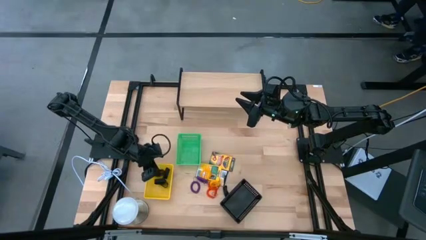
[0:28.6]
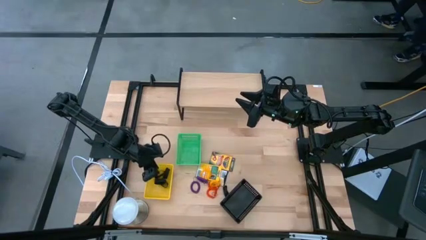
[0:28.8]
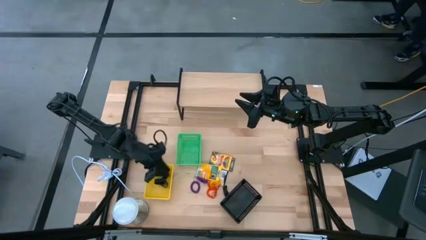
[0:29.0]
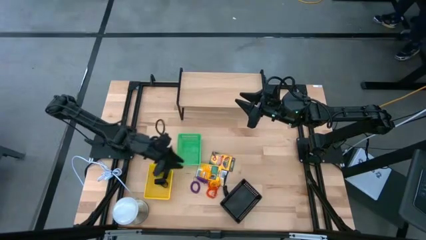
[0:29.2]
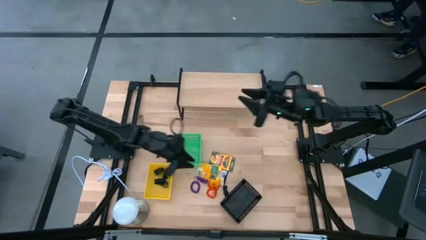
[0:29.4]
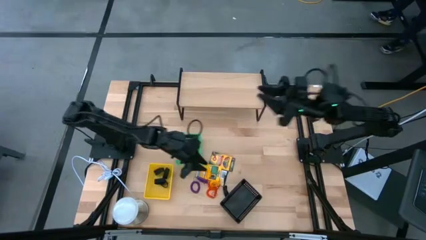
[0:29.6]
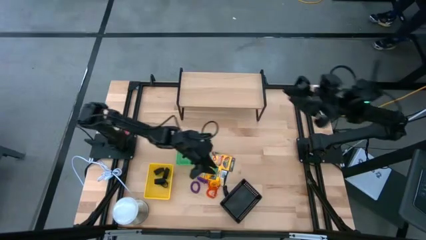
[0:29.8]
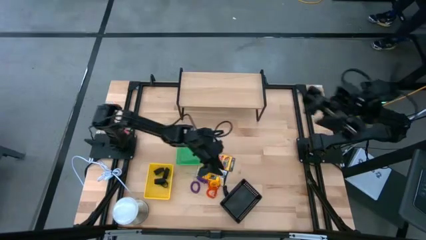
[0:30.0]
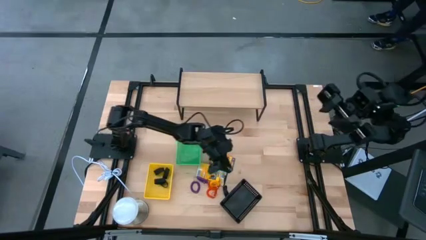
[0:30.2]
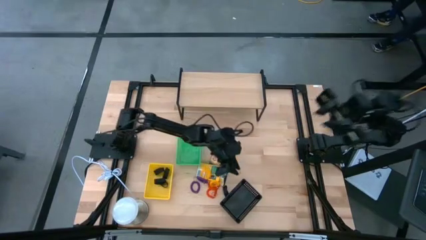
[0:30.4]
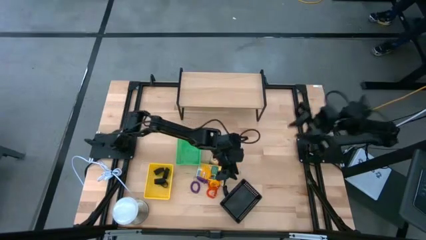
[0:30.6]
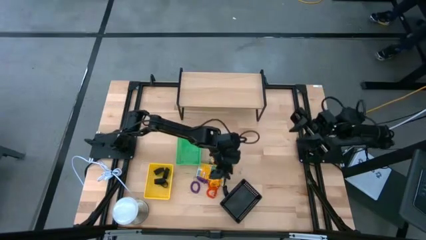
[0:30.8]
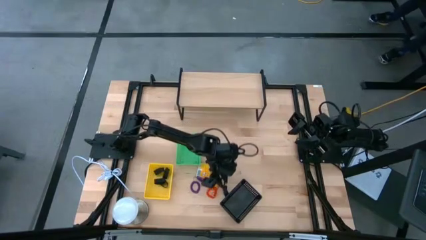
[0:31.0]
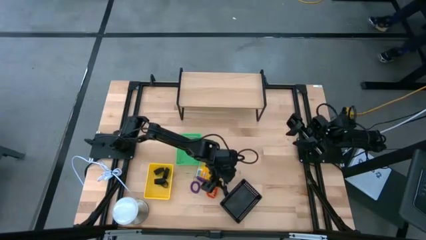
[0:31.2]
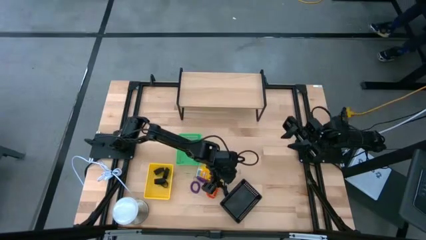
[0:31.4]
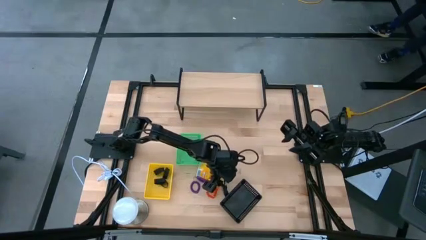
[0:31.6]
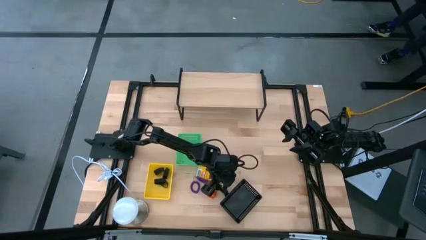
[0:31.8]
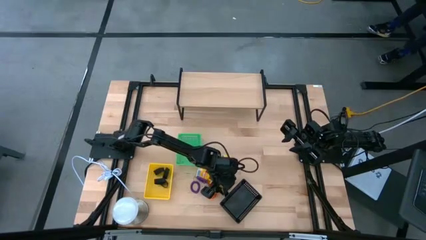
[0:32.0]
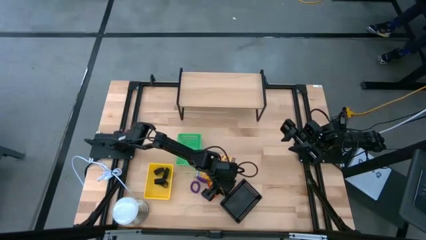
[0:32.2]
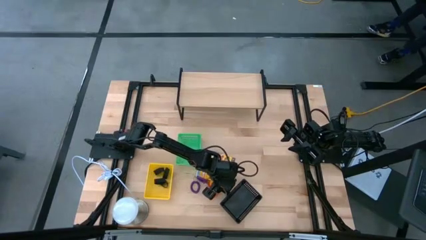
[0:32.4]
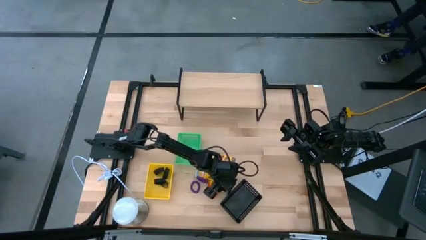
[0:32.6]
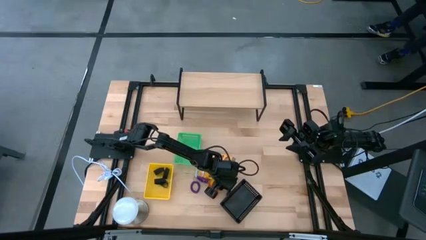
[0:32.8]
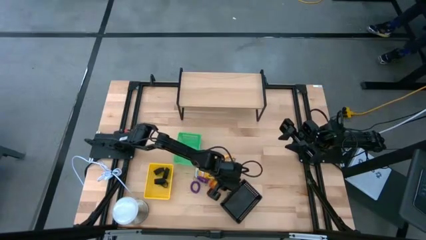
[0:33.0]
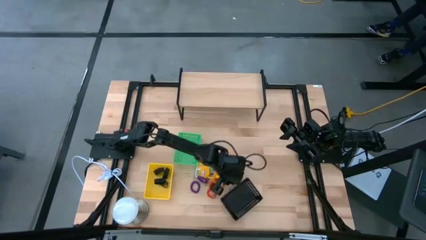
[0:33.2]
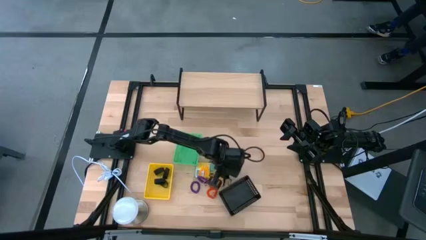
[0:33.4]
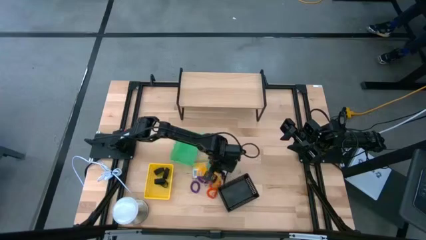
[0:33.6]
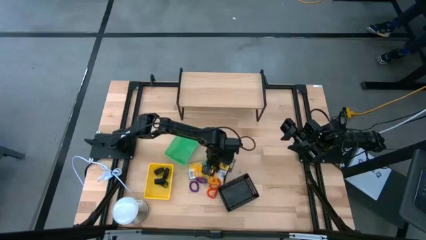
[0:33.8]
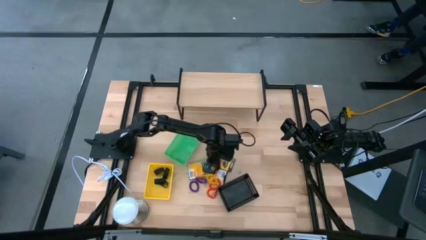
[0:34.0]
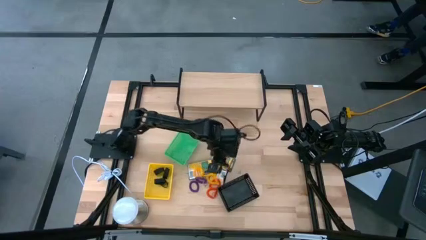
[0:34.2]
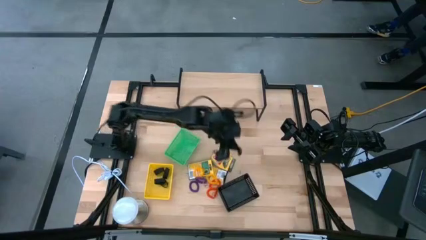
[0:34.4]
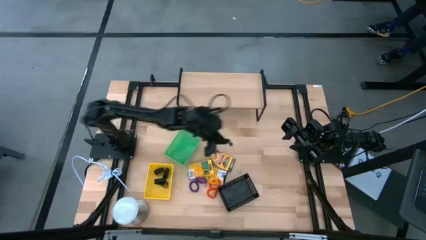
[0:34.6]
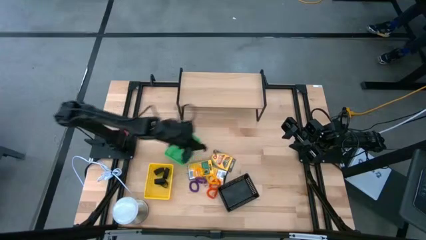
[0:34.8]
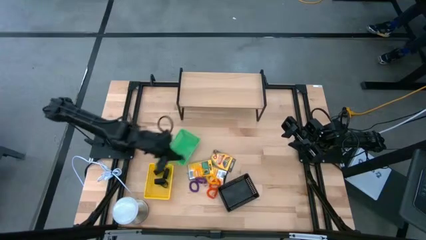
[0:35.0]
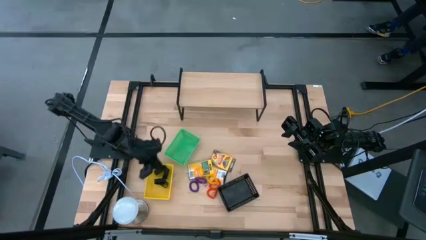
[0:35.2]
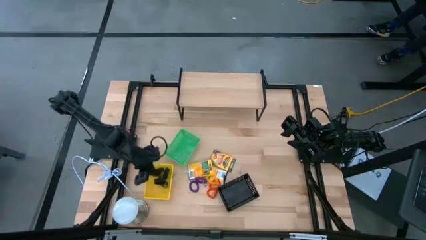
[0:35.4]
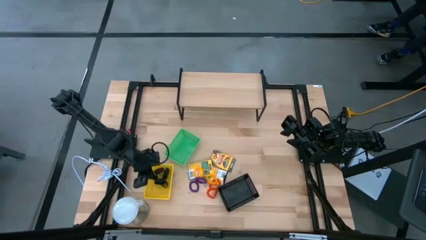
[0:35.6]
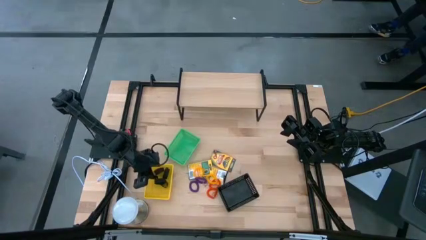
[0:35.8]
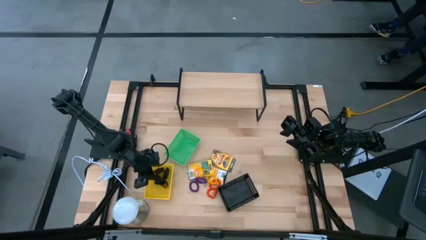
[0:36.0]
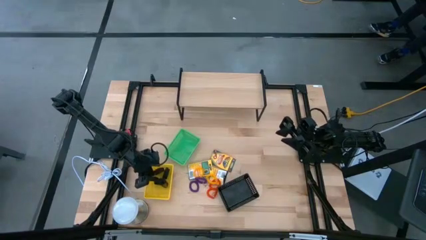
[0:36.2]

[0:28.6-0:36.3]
Task: Pick & Place Office Desk Supplies
Put the black rubber band into the yellow basket

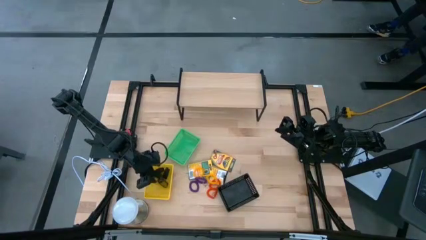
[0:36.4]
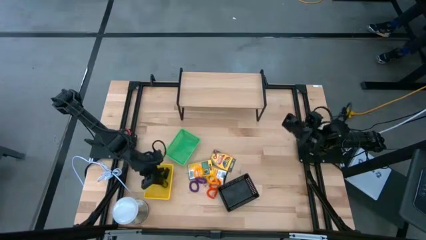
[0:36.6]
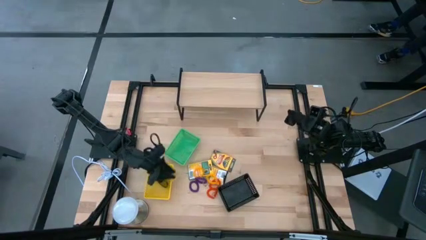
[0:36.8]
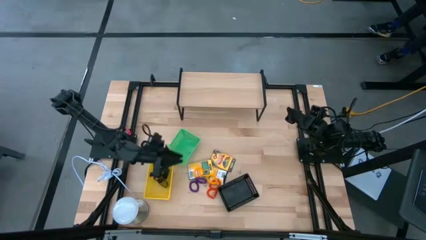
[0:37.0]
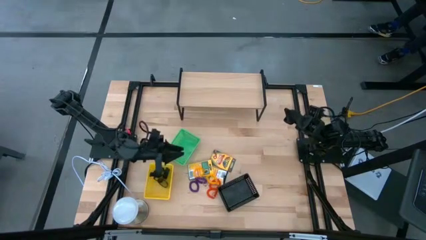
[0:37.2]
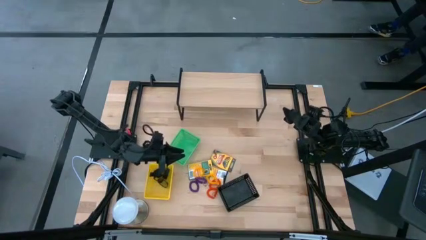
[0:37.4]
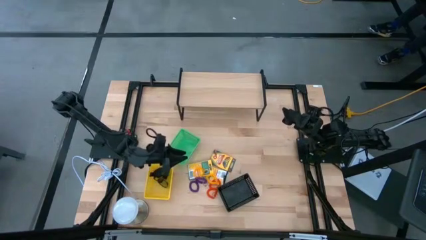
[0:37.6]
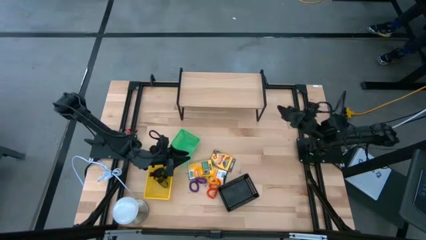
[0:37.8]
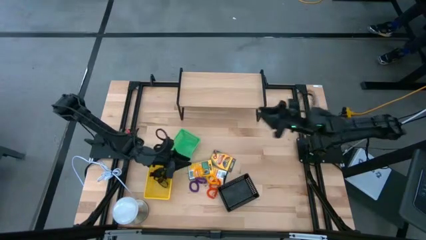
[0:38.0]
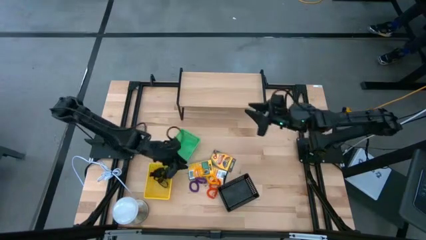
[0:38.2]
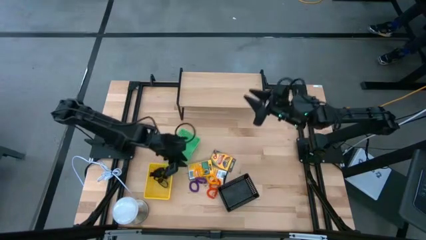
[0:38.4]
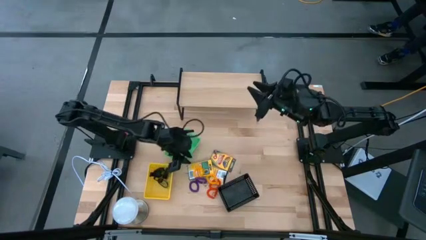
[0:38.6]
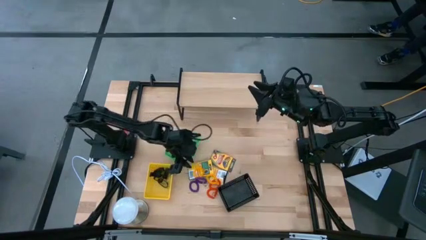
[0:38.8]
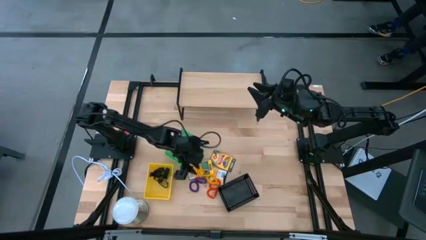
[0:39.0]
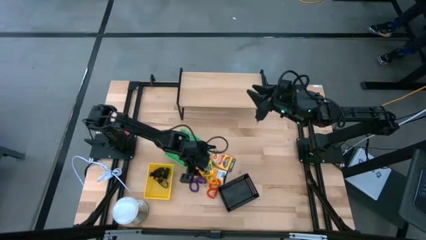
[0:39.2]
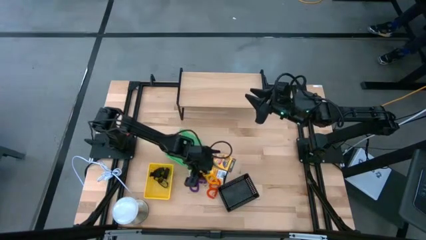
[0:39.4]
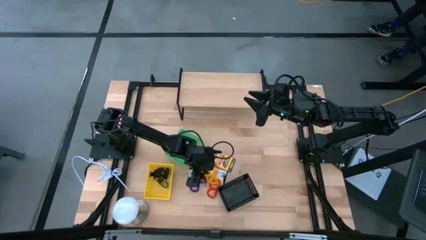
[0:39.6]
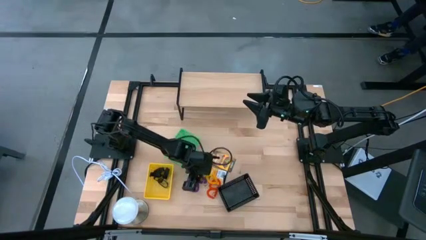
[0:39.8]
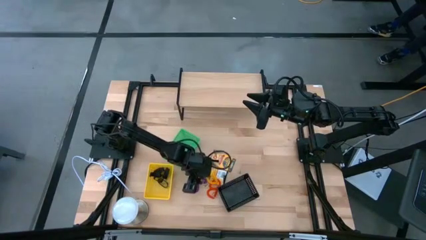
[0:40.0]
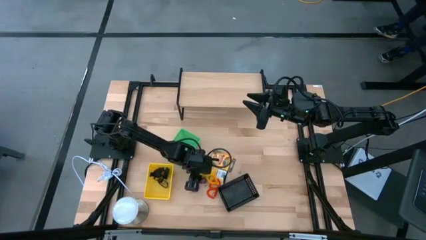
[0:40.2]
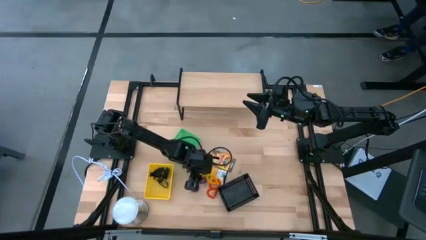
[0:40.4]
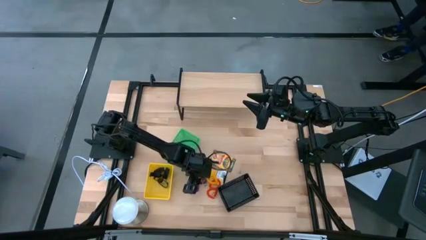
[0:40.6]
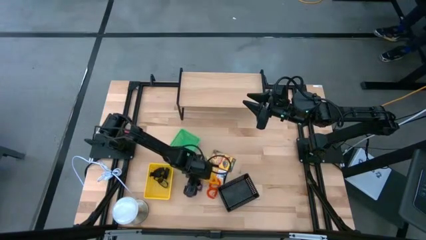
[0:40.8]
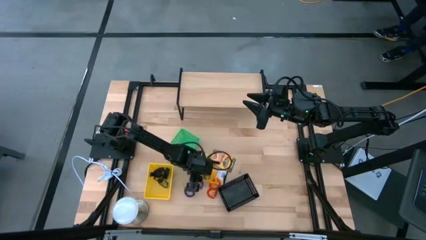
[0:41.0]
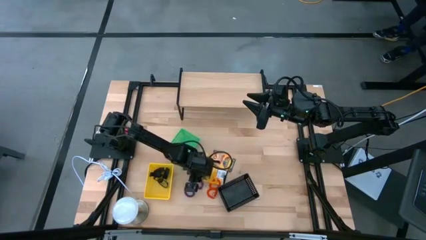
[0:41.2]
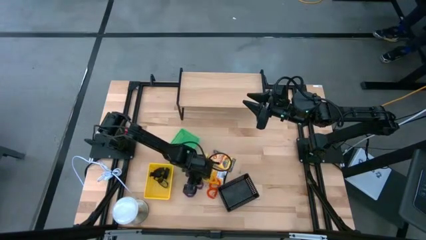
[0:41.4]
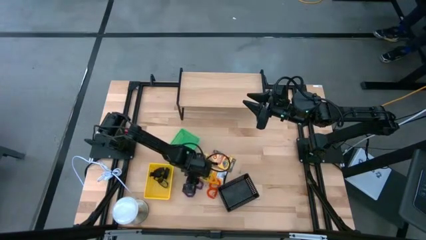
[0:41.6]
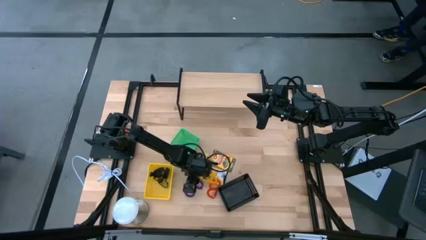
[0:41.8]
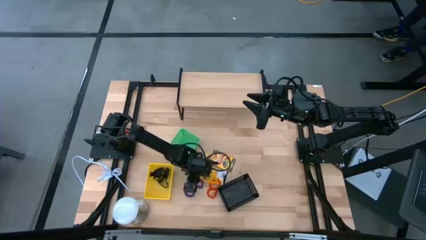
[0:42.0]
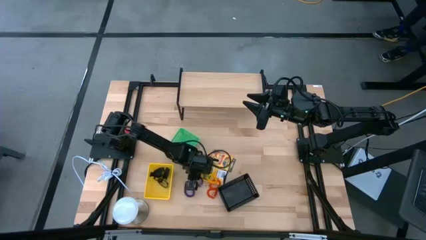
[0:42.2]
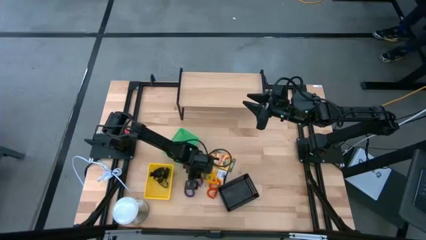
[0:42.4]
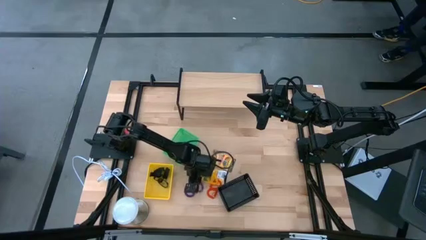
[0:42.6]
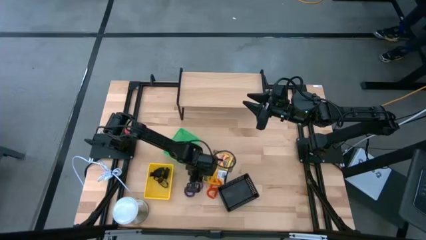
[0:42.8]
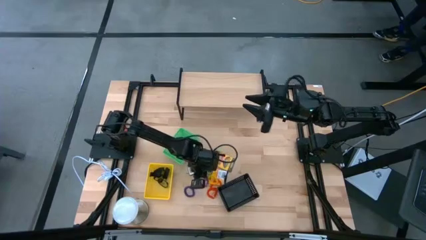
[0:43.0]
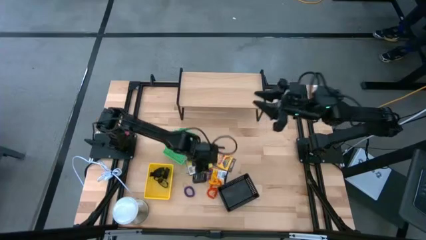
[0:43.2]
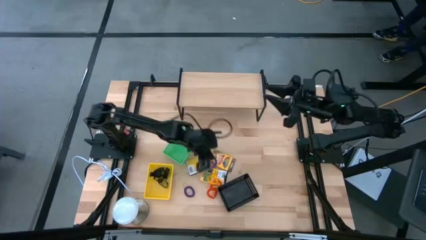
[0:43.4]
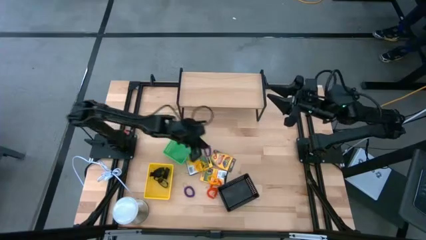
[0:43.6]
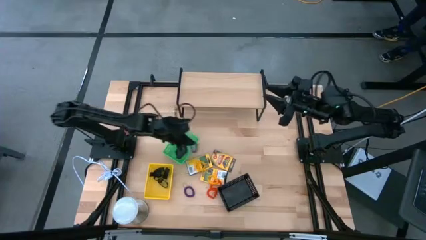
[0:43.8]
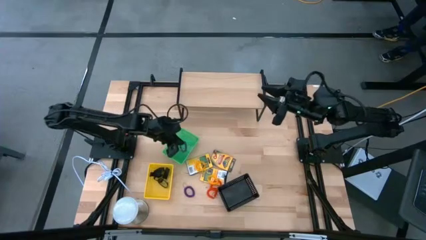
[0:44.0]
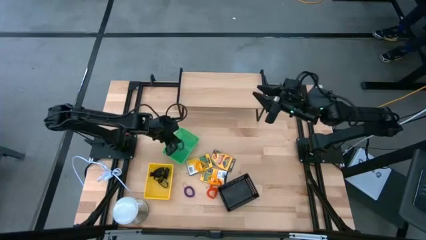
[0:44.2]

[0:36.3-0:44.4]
Put the violet spring keychain into the green basket
